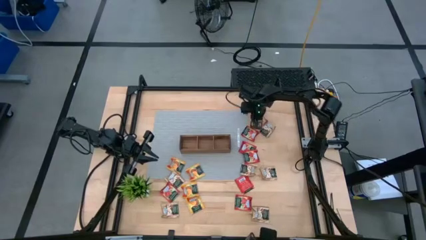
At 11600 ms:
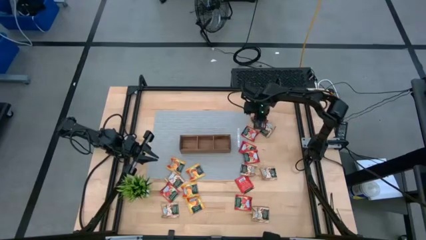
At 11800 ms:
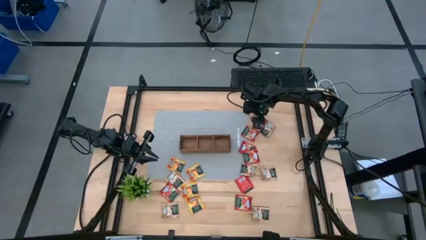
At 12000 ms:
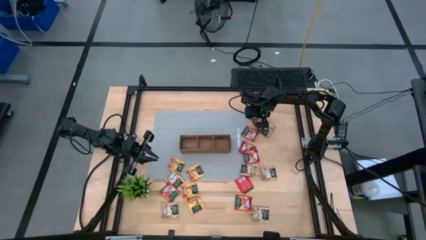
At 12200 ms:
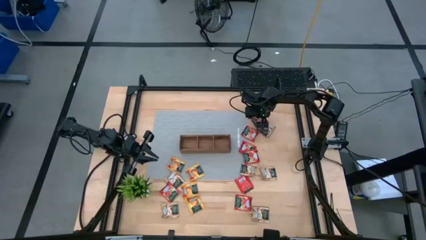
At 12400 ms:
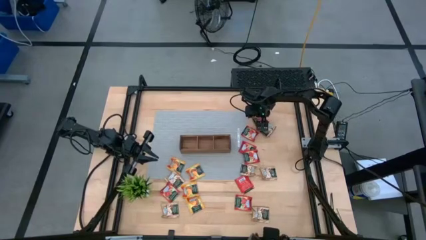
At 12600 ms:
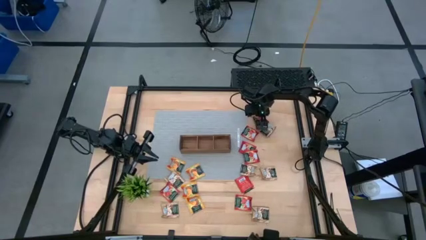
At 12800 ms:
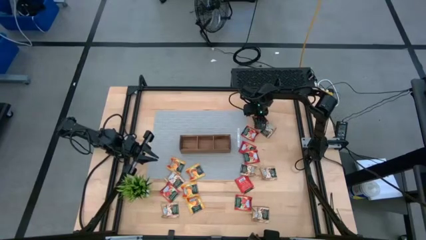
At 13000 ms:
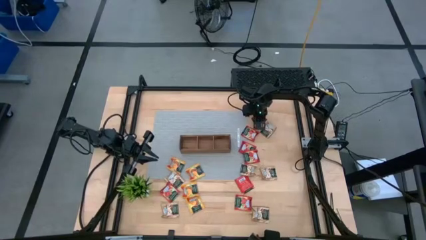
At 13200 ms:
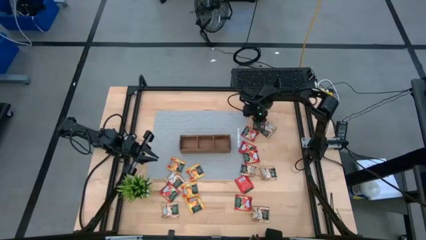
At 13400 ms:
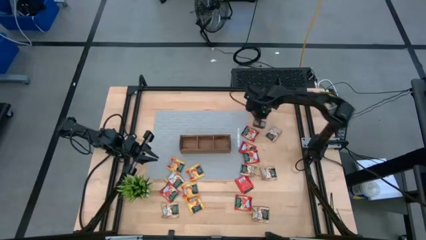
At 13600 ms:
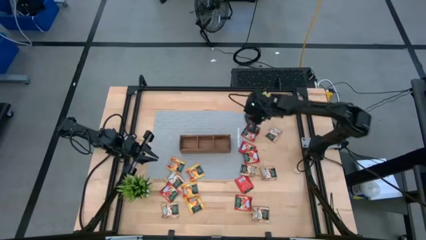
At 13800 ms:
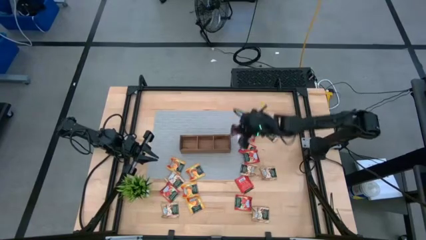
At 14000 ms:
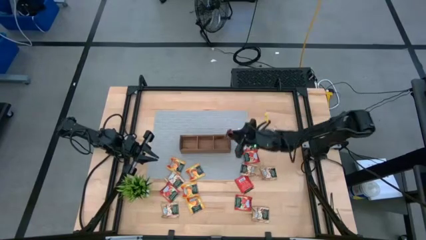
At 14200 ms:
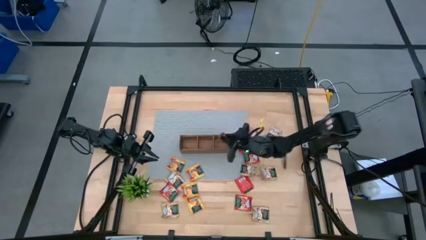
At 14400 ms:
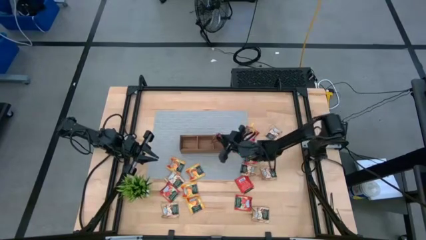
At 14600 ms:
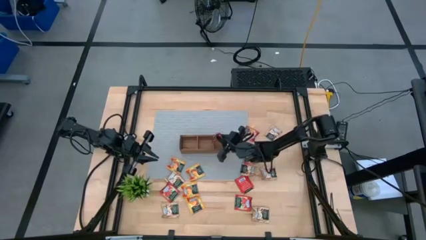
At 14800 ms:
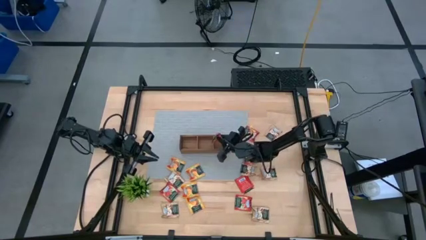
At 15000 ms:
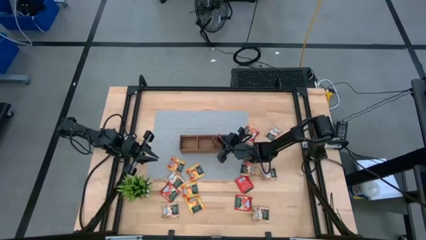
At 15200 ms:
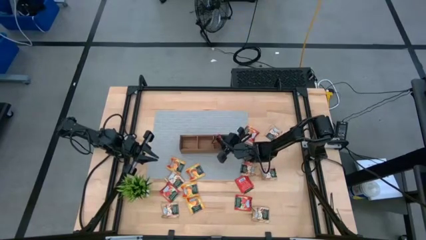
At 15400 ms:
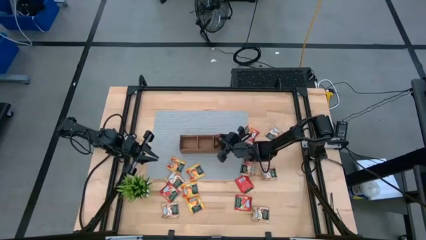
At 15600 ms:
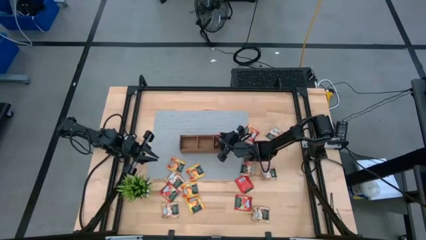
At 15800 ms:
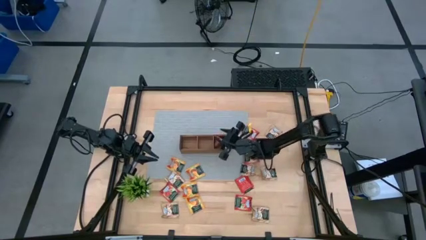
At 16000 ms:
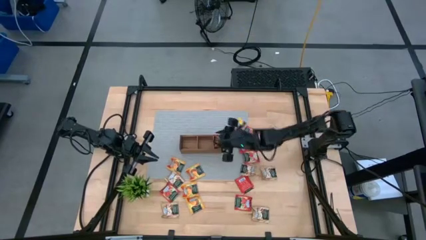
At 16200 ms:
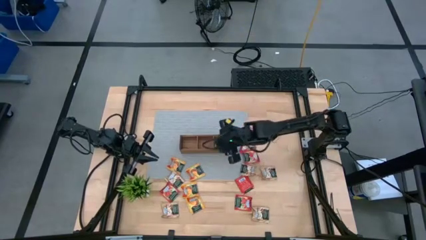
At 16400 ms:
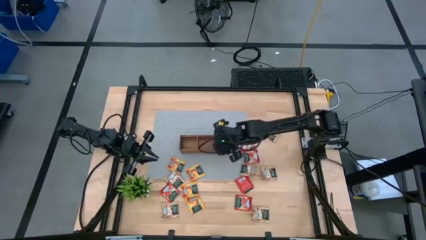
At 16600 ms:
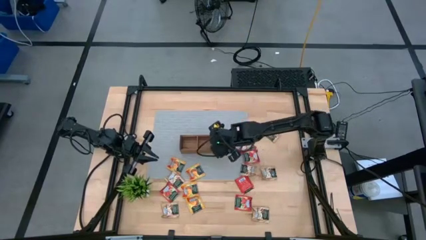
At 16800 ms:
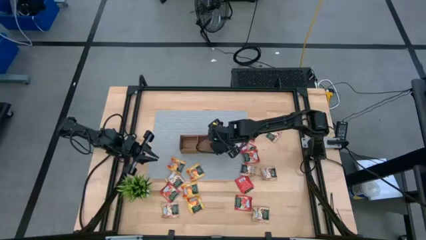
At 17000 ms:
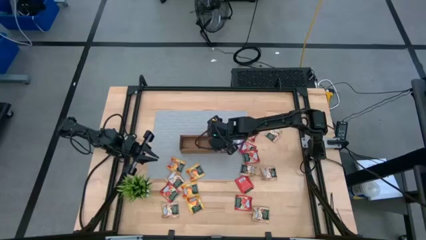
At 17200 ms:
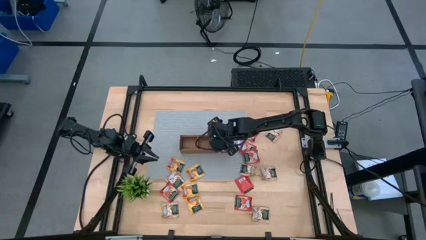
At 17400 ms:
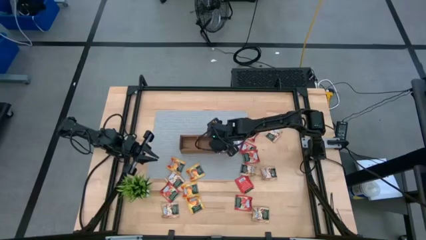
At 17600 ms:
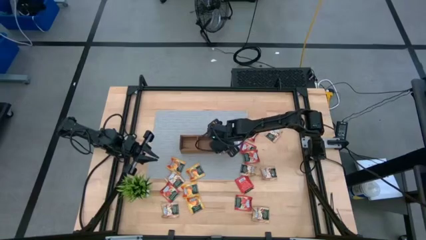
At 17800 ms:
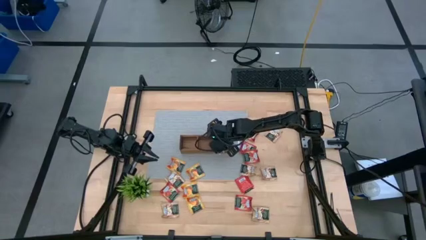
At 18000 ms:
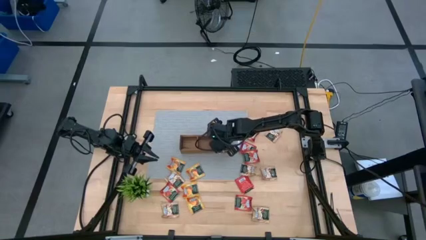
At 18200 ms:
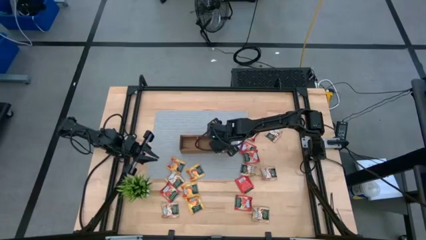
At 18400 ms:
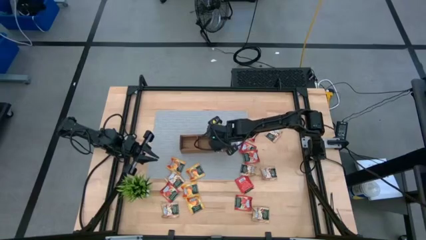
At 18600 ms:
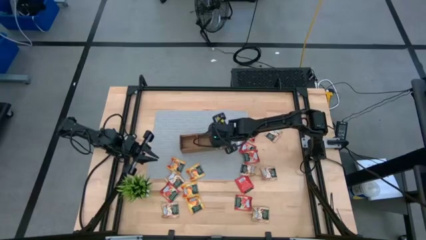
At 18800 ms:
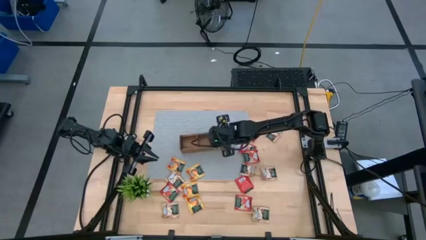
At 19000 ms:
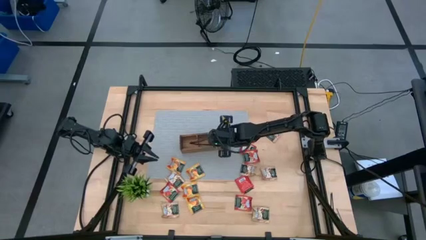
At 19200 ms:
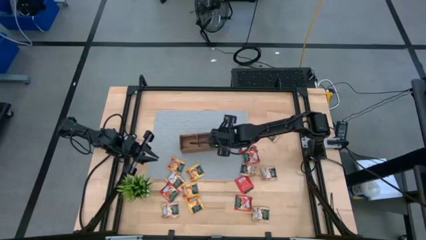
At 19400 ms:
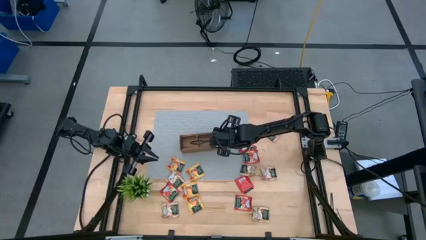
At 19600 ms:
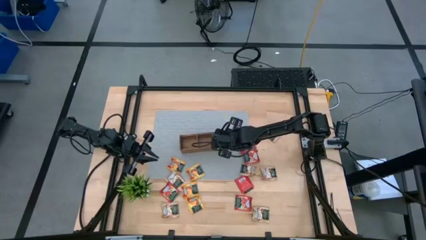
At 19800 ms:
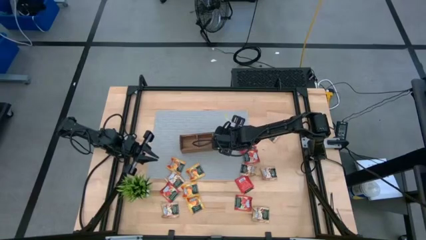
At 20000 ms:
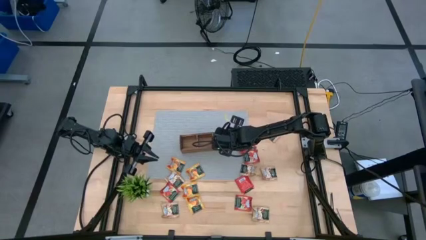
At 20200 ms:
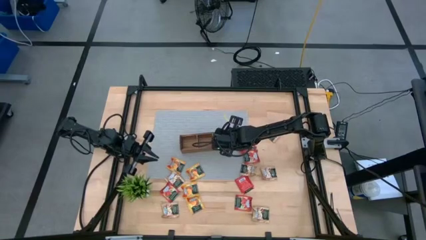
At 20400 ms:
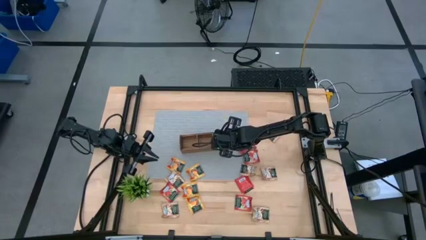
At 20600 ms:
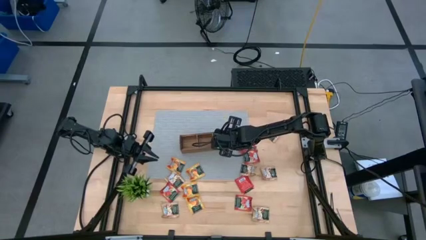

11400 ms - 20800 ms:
Task: Pick & Place Tea
Put the red tea bag into the wooden organizer

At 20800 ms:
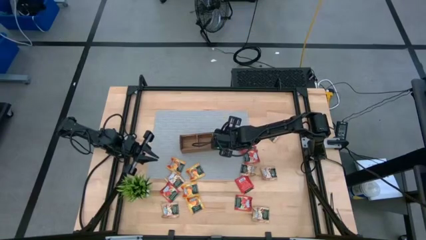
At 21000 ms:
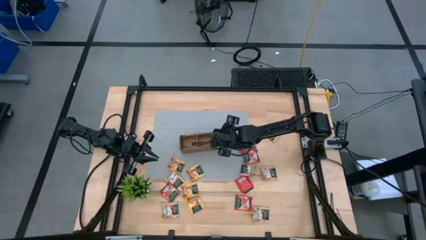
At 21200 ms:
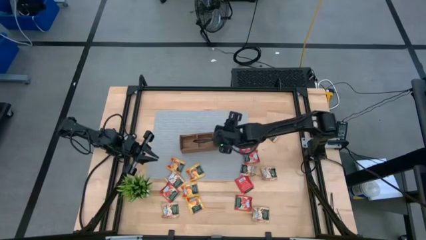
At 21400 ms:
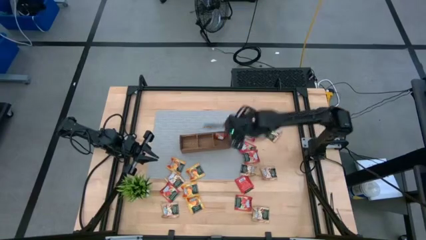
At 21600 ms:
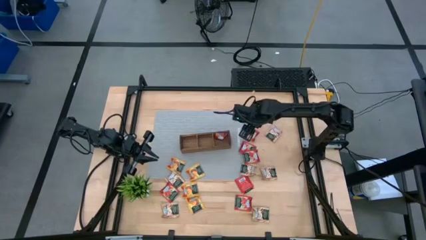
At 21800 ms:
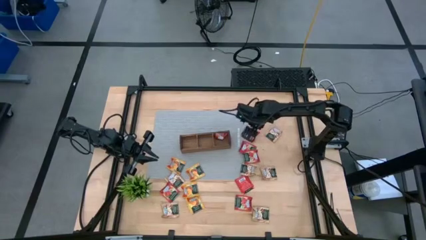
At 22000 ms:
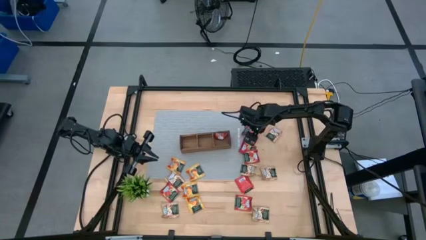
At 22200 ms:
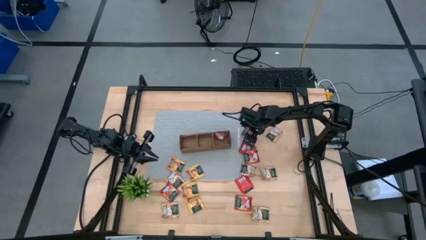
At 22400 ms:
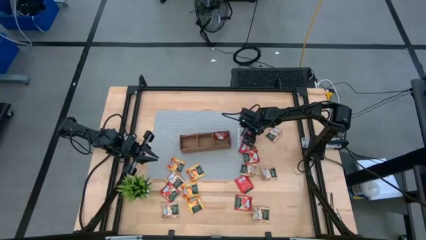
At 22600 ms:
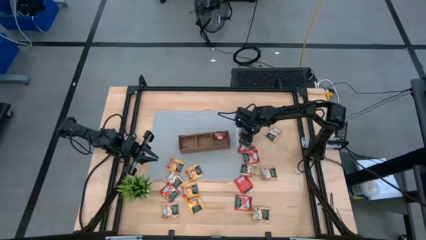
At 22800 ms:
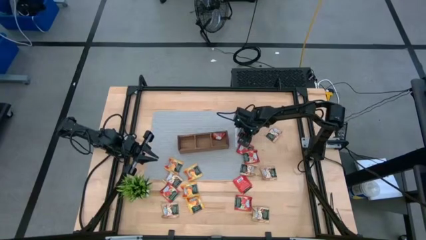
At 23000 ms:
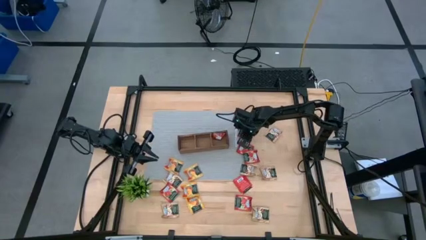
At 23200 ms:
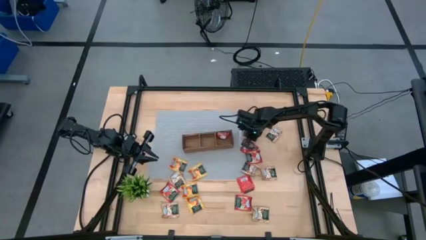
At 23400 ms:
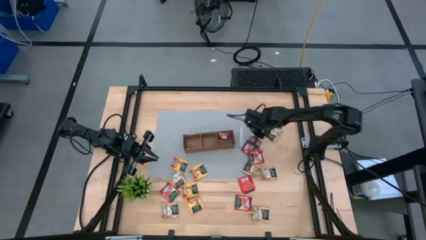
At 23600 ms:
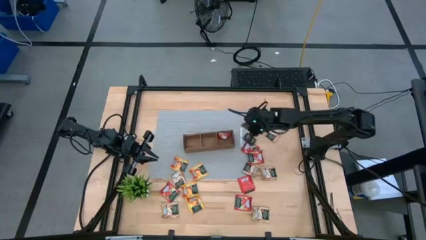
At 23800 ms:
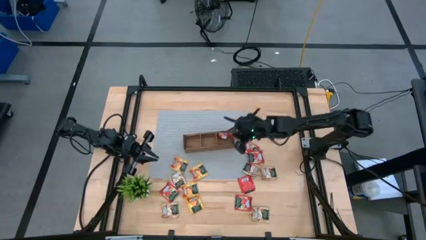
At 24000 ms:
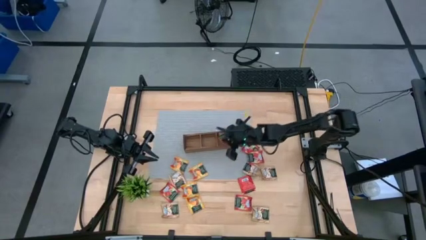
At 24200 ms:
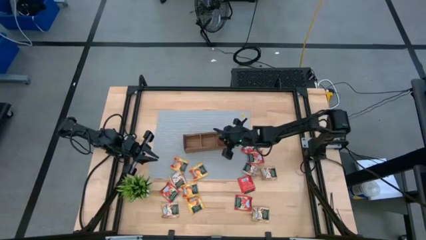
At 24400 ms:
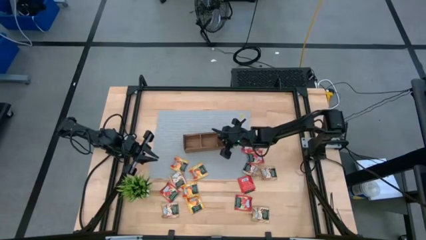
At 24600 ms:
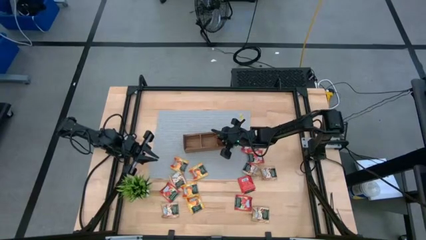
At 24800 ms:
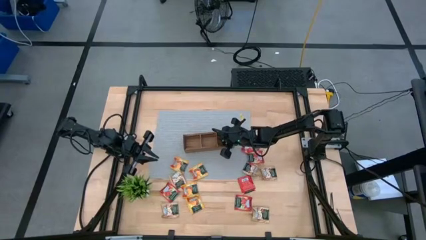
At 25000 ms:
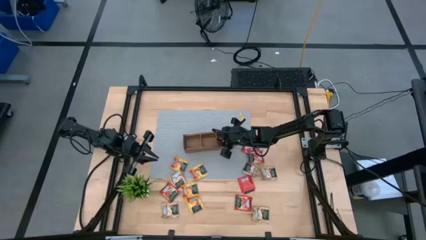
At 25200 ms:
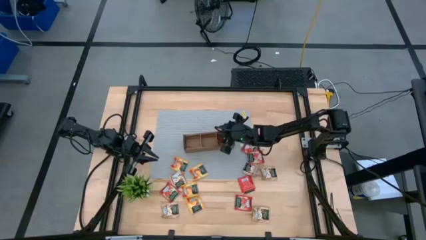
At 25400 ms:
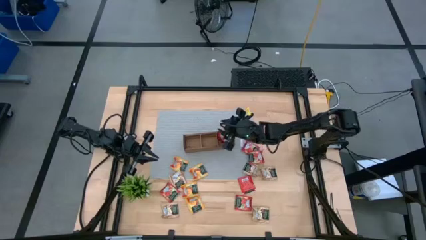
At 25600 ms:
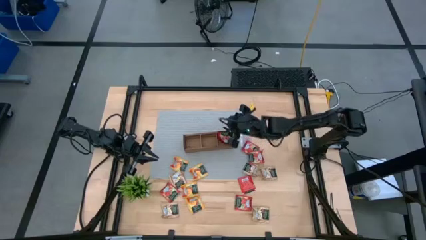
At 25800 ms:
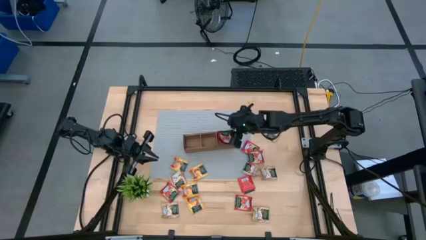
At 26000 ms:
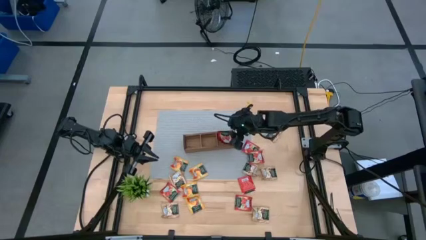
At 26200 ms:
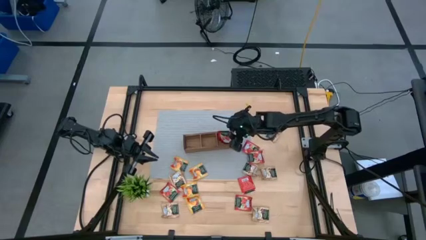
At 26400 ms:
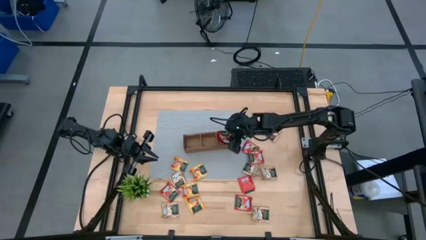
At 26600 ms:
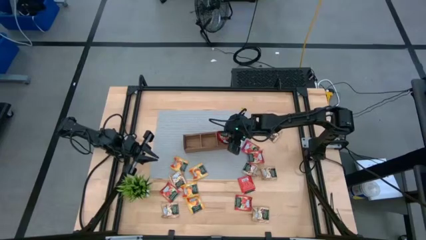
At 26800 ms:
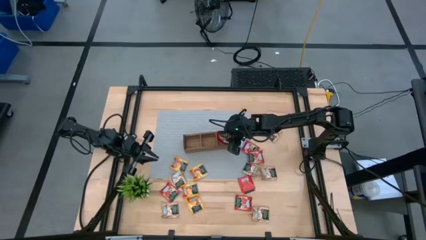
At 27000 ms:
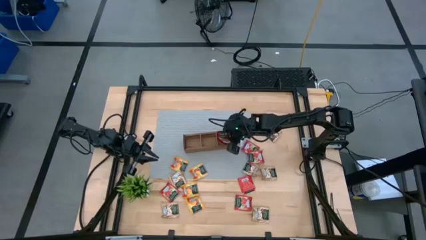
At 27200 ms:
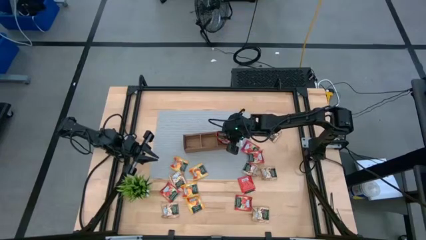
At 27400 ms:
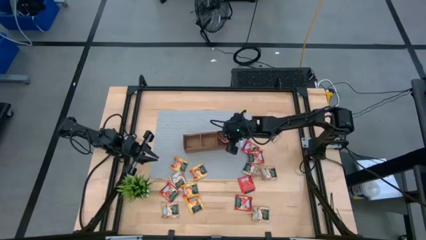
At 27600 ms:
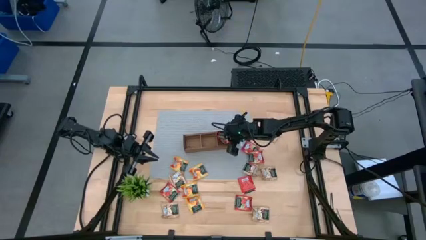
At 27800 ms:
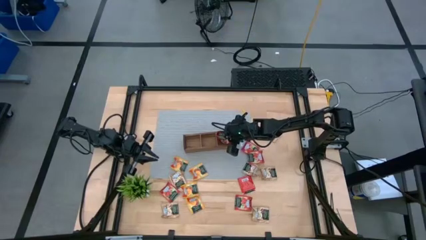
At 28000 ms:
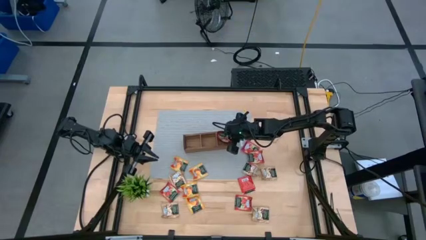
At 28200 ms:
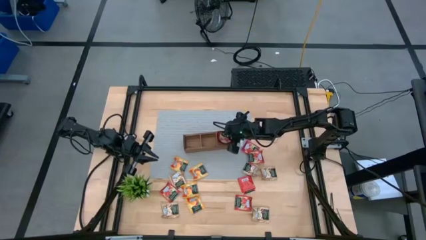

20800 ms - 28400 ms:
Put the red tea bag into the wooden organizer
